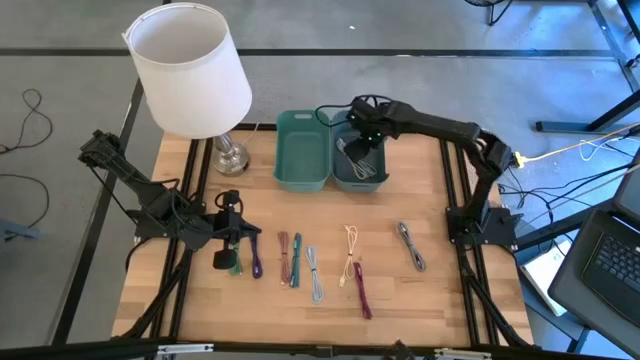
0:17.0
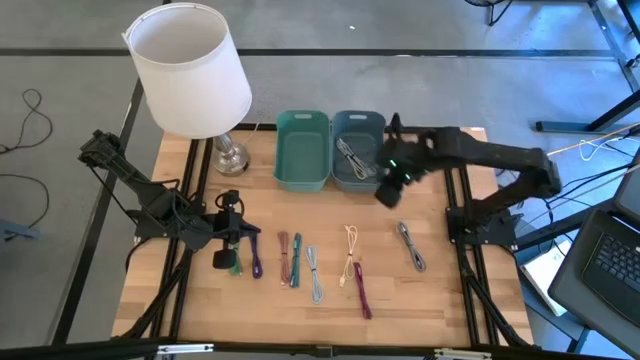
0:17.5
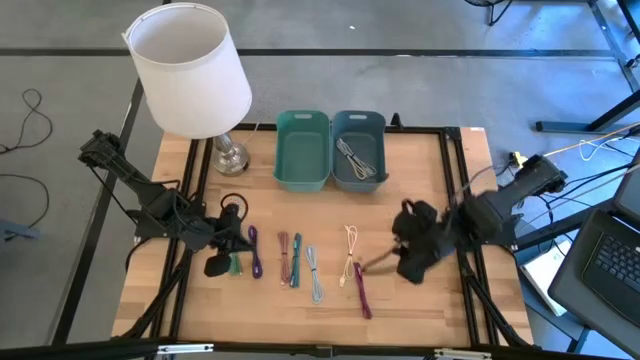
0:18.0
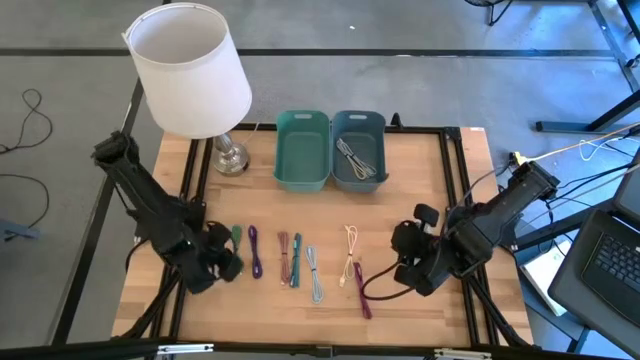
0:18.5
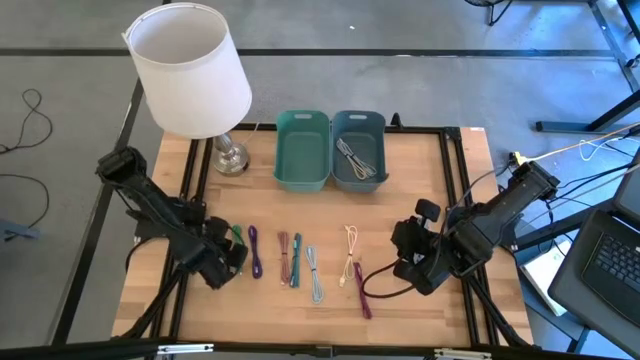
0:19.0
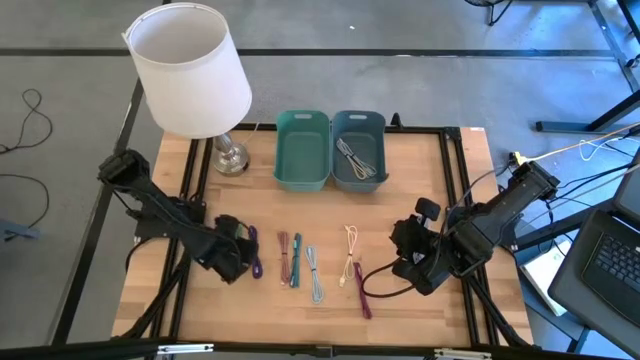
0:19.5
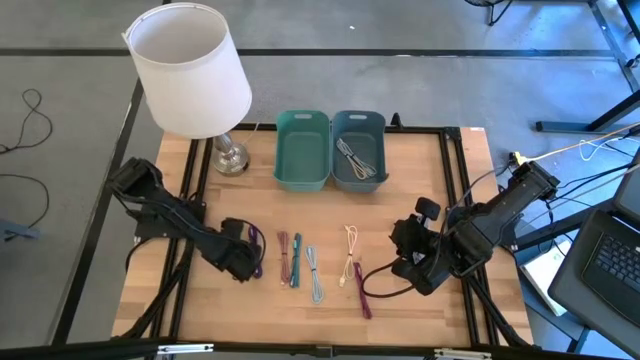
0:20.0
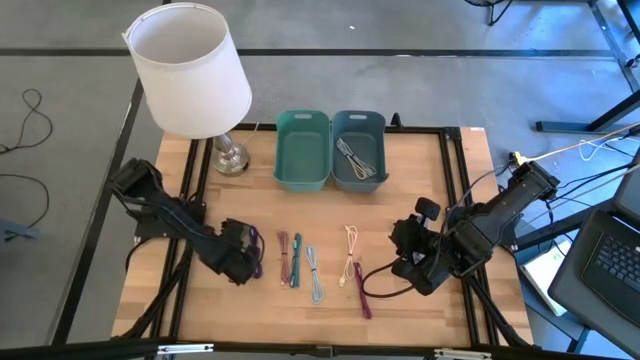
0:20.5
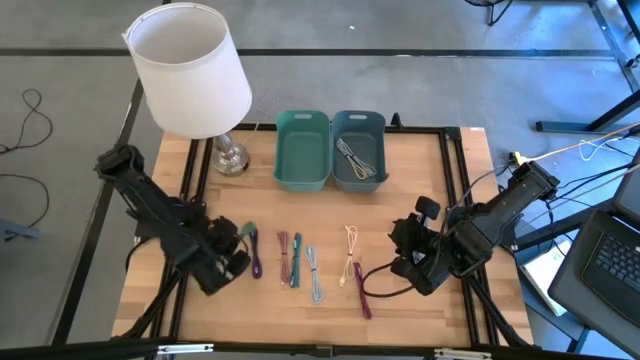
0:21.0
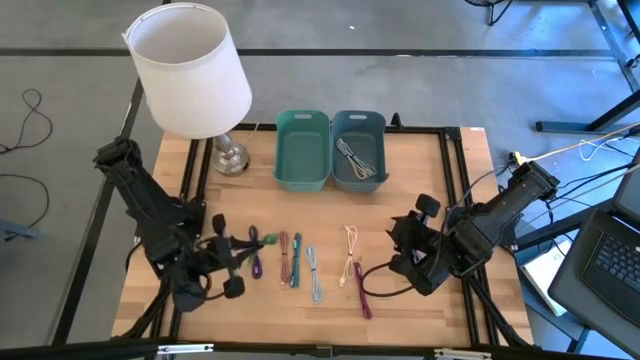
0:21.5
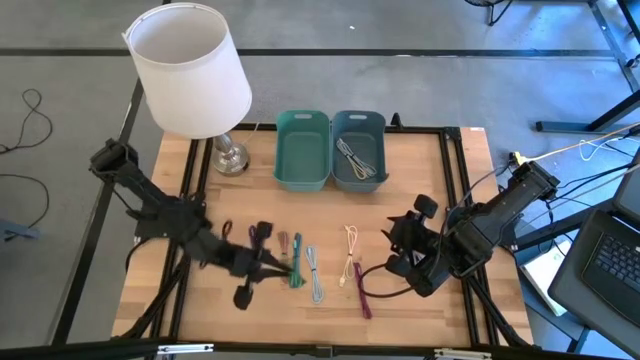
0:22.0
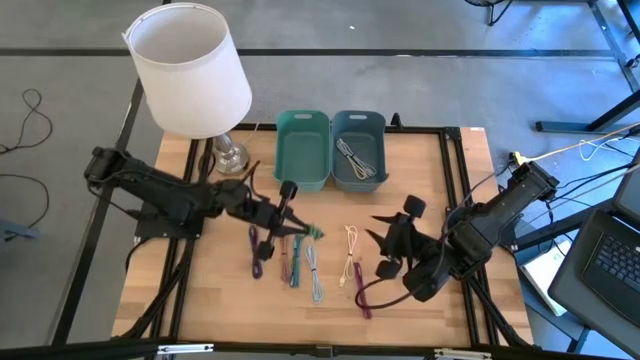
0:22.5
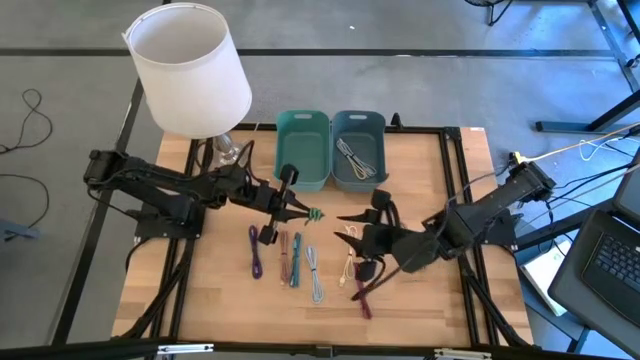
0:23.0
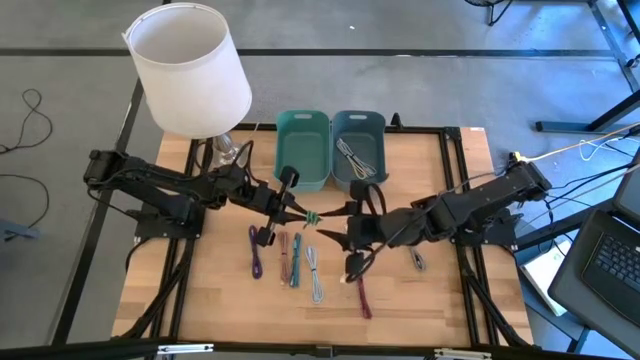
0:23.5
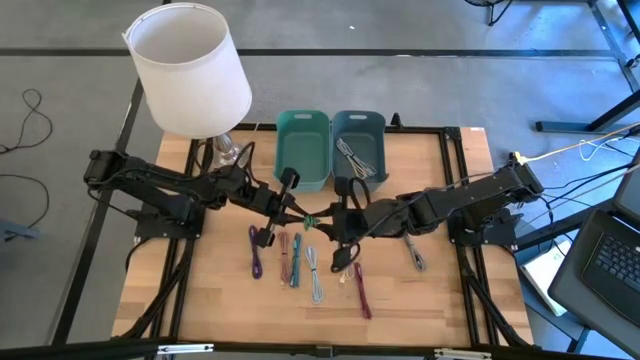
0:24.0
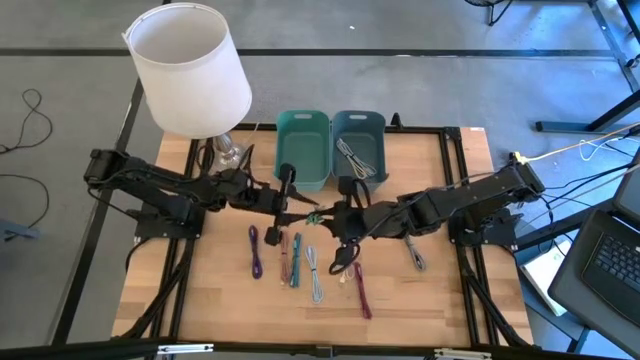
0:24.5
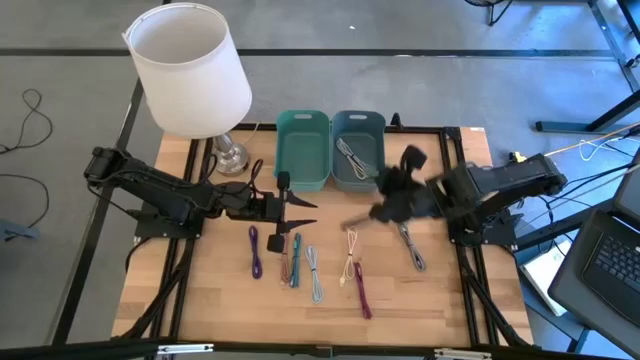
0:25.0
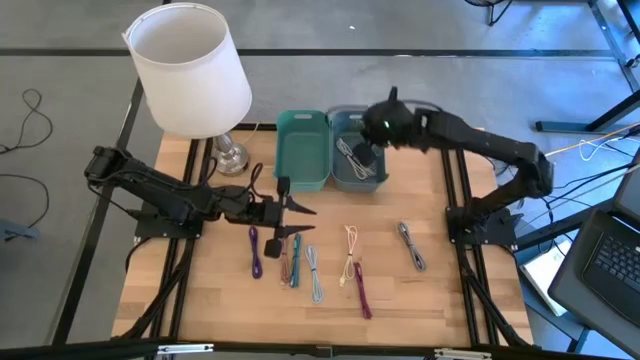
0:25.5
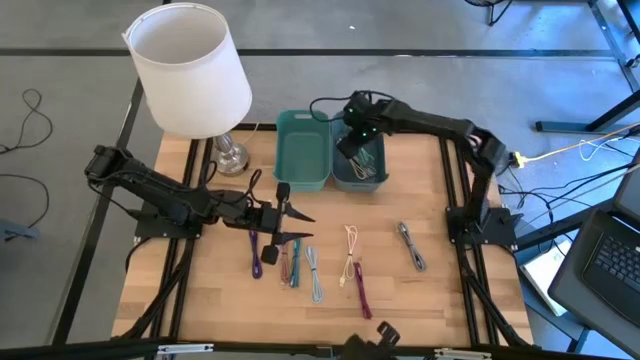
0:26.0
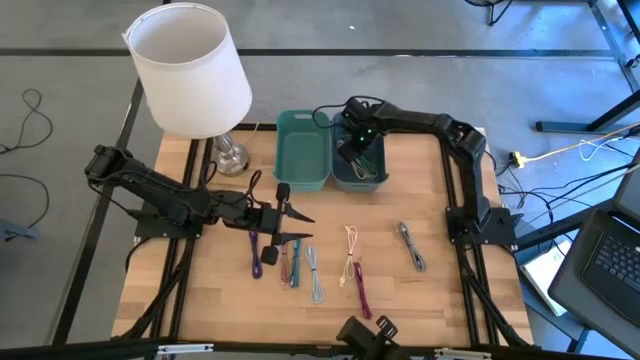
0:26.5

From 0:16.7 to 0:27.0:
Put the green charger cable into the blue bin

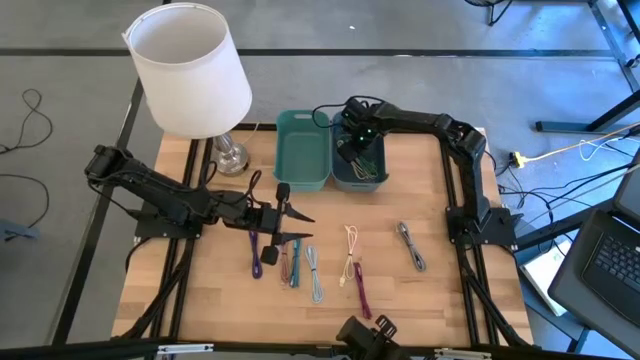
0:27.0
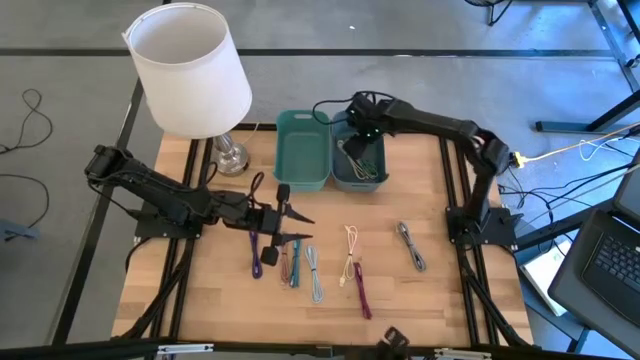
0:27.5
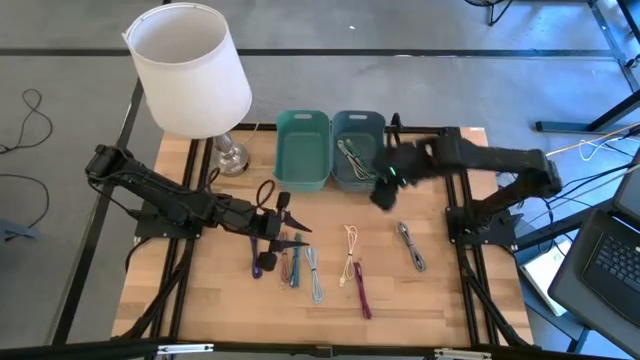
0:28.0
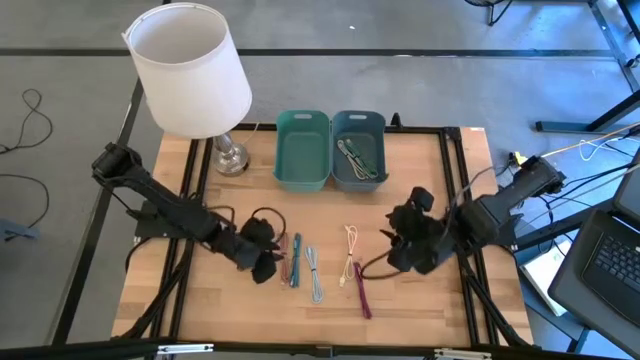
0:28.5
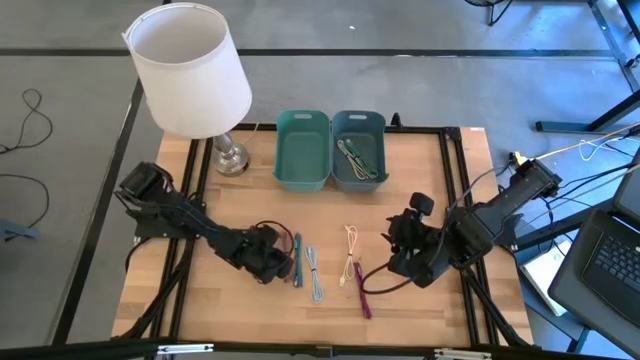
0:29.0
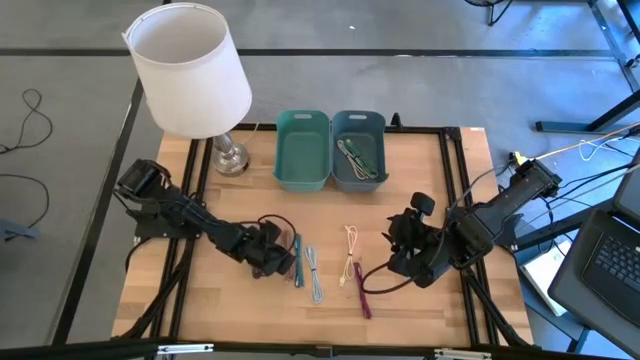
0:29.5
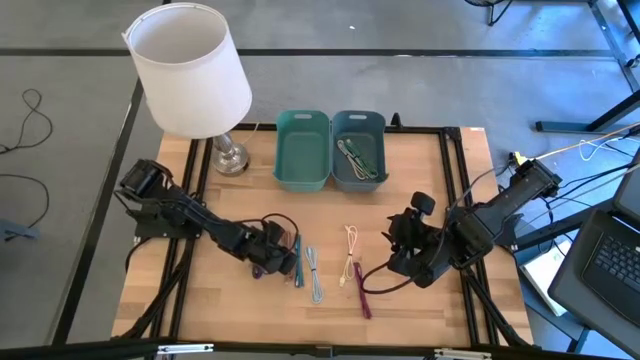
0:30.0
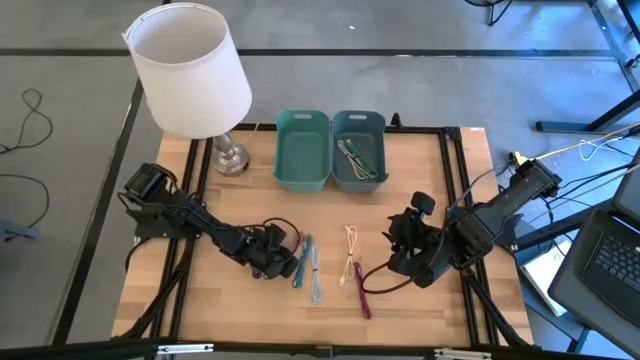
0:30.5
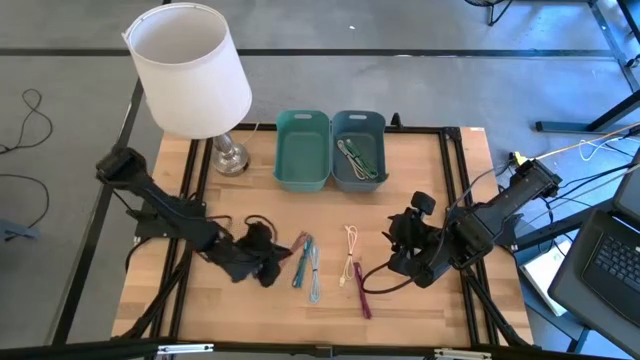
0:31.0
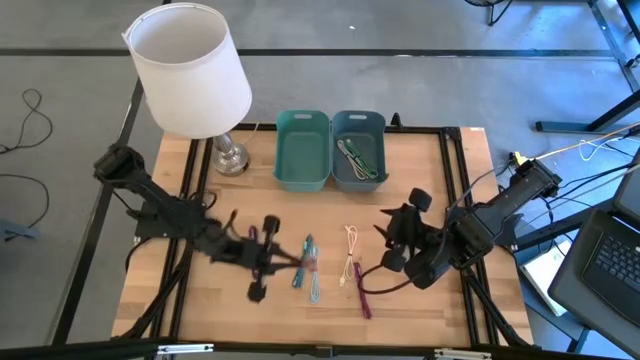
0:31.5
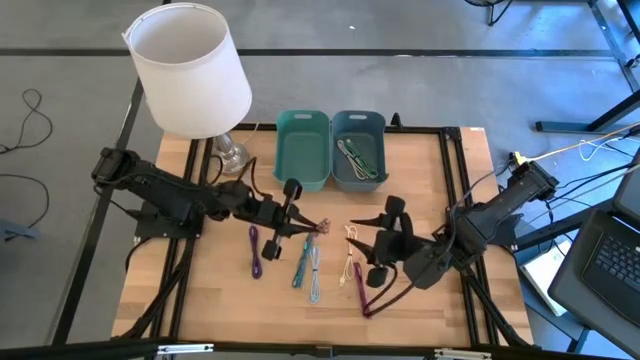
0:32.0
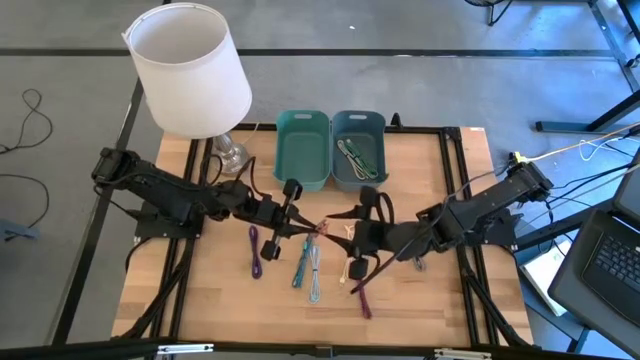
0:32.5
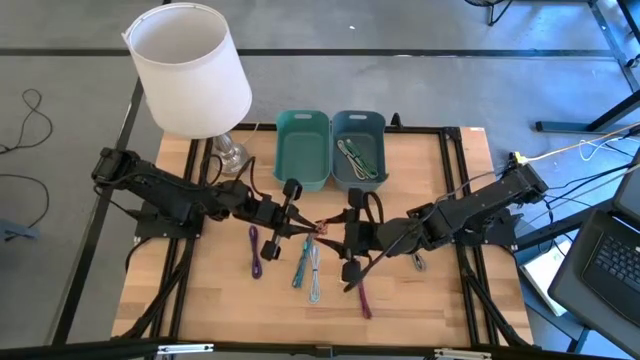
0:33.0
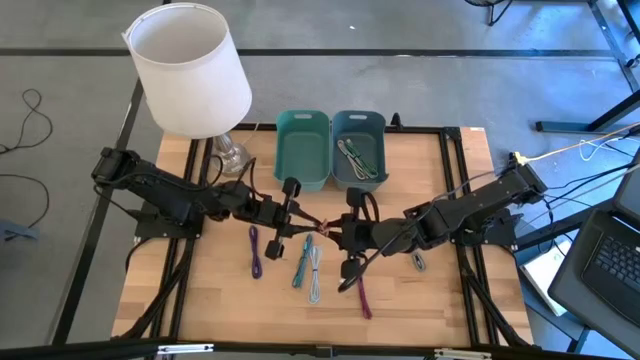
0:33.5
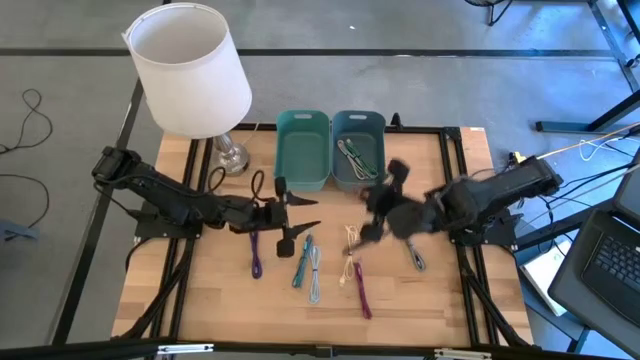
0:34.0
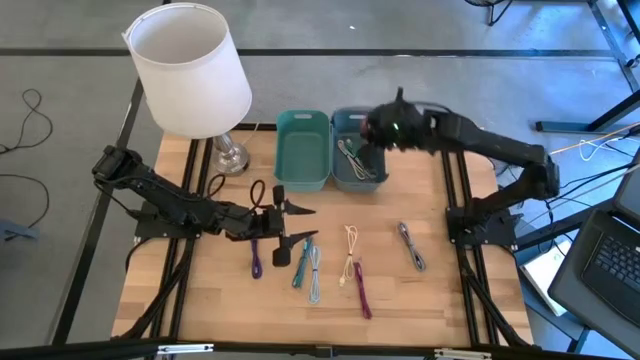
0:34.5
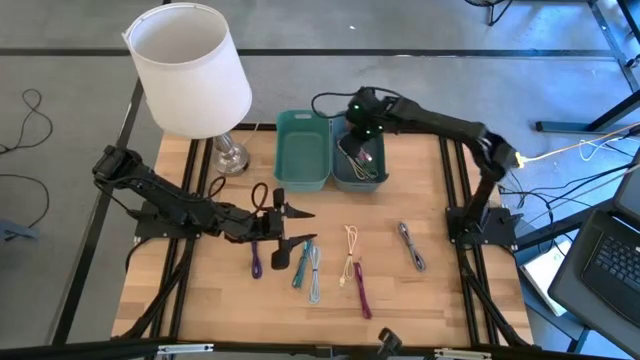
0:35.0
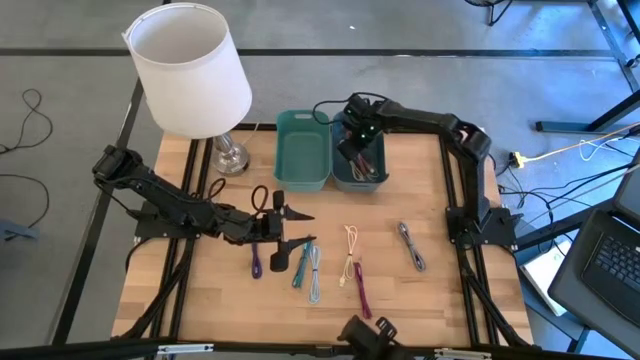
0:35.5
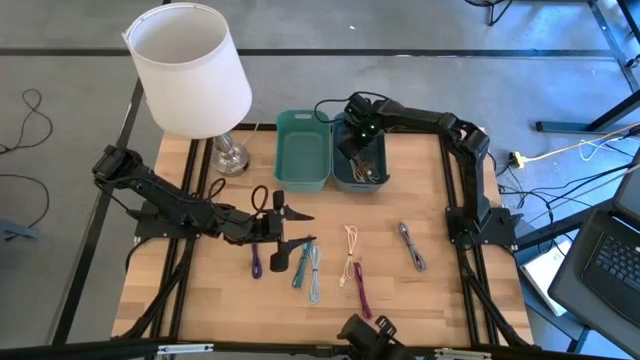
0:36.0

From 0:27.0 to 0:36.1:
Put the pink charger cable into the blue bin
